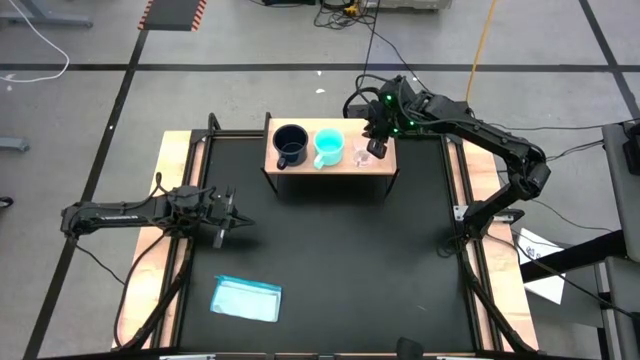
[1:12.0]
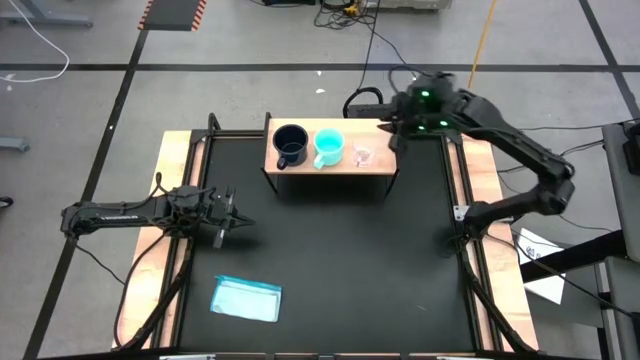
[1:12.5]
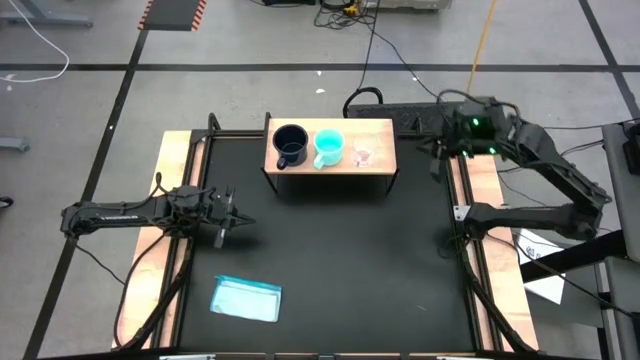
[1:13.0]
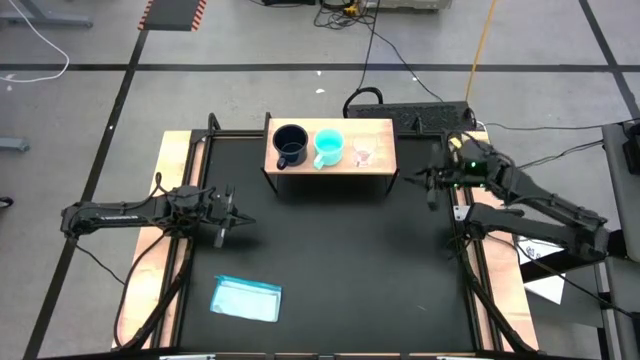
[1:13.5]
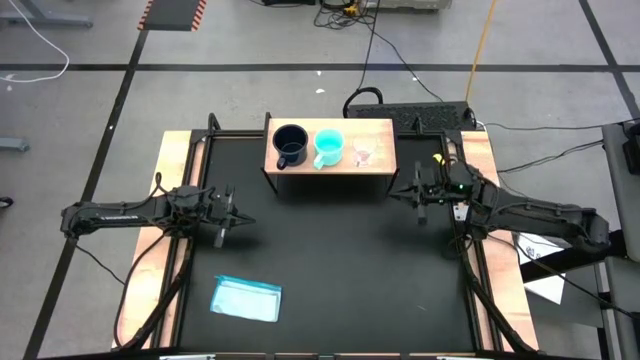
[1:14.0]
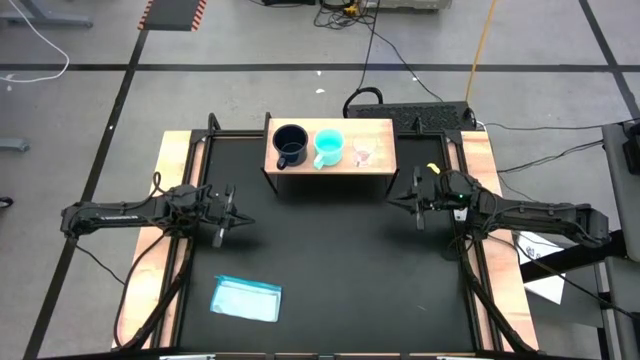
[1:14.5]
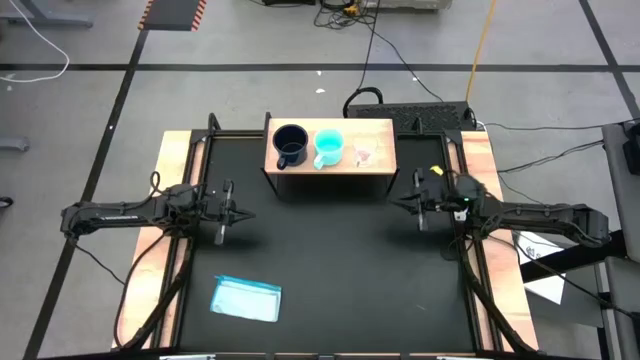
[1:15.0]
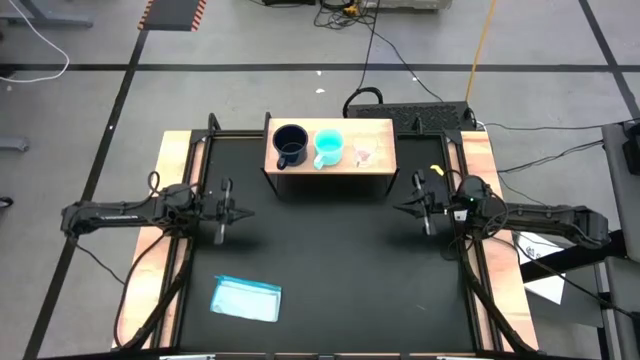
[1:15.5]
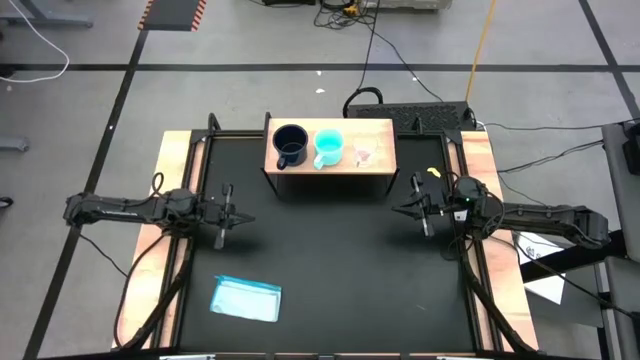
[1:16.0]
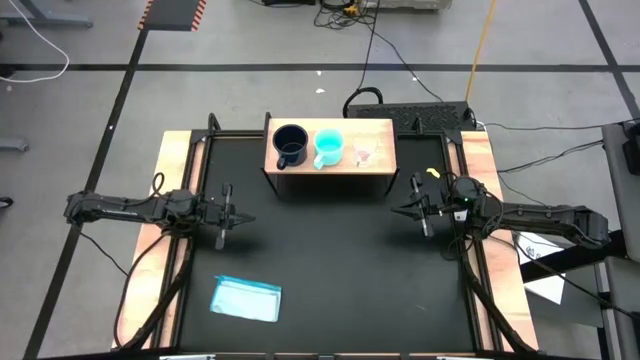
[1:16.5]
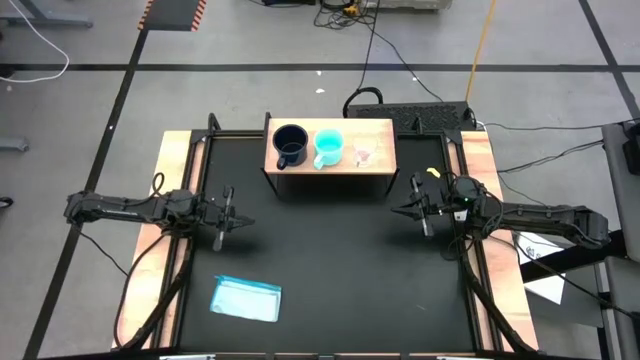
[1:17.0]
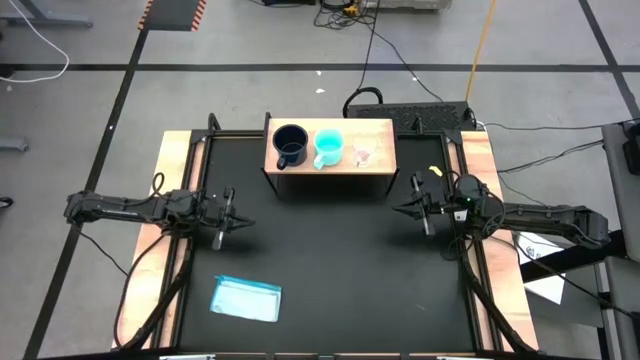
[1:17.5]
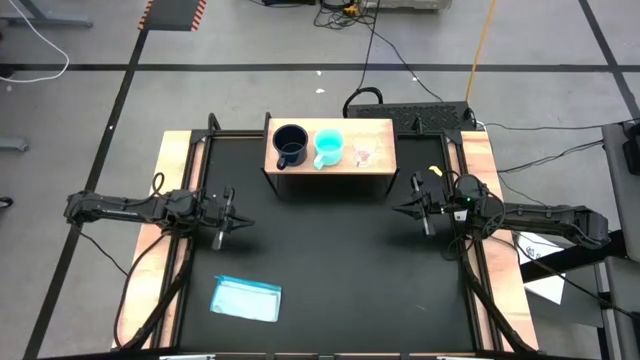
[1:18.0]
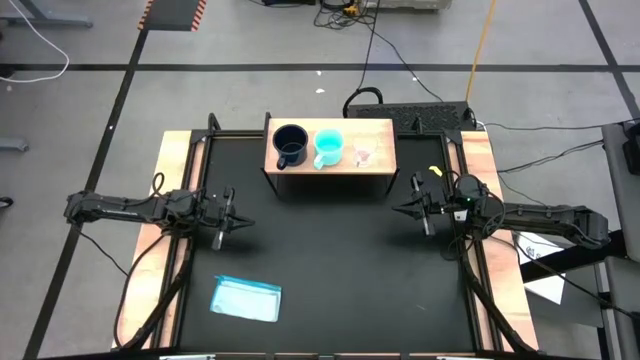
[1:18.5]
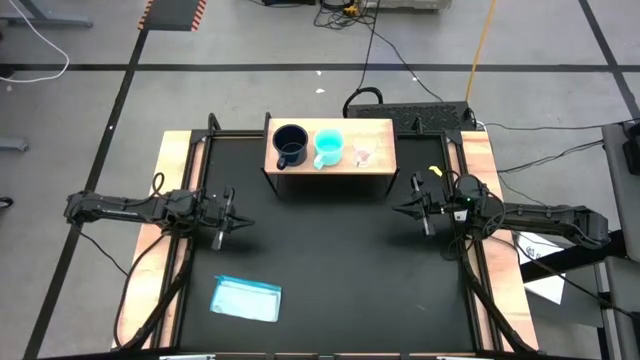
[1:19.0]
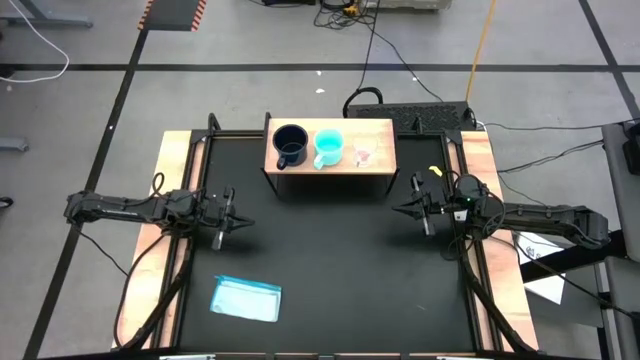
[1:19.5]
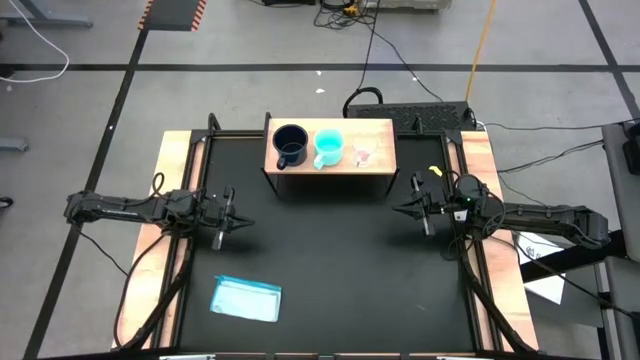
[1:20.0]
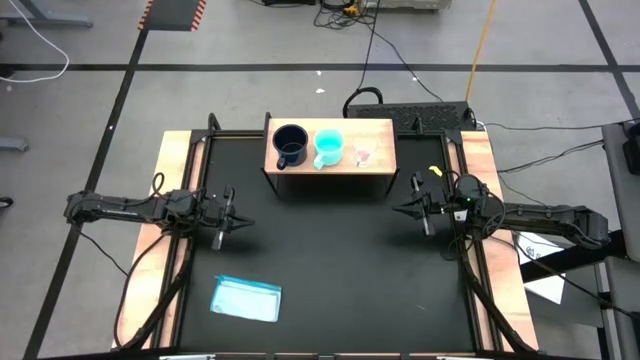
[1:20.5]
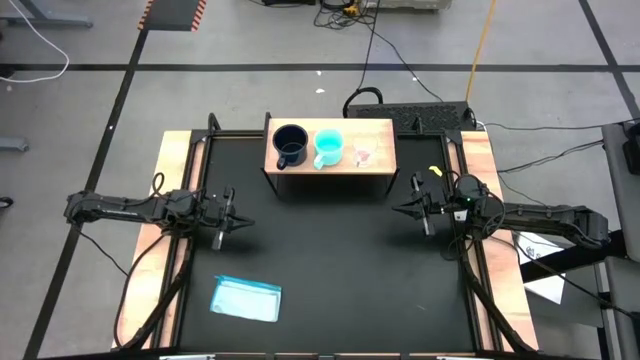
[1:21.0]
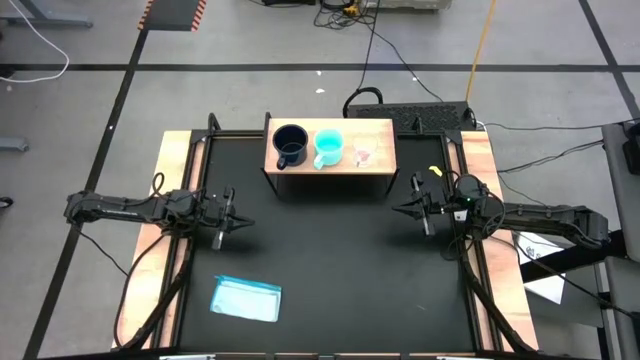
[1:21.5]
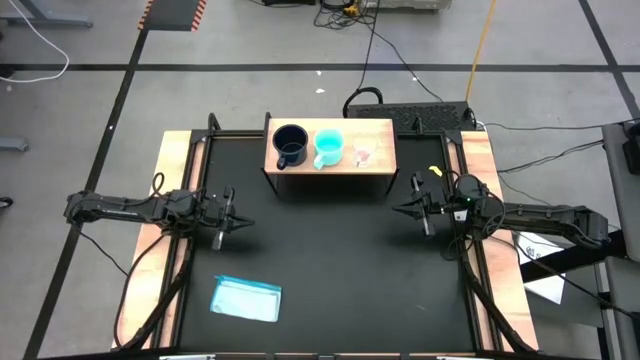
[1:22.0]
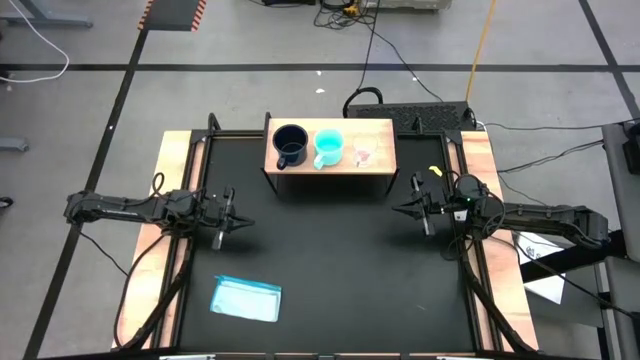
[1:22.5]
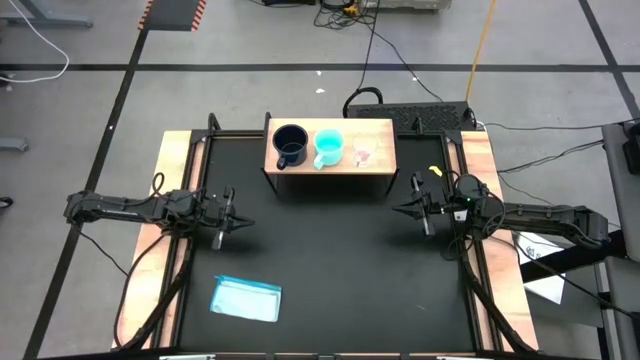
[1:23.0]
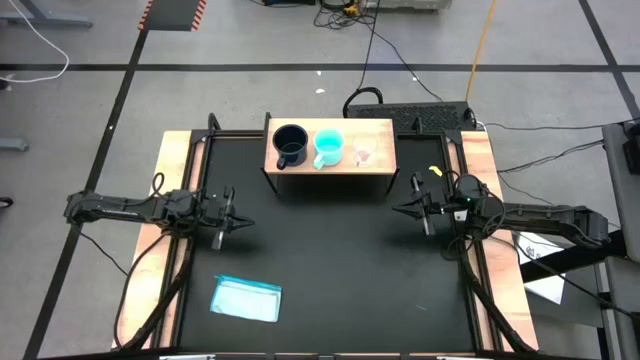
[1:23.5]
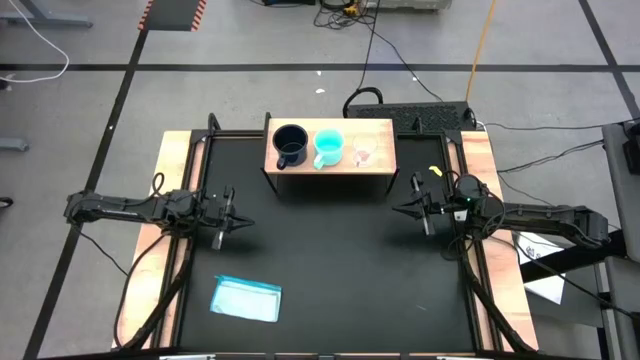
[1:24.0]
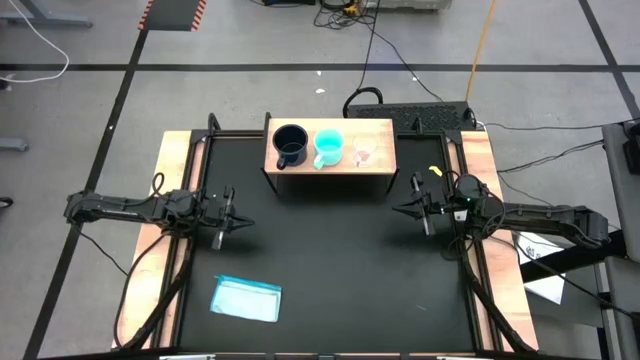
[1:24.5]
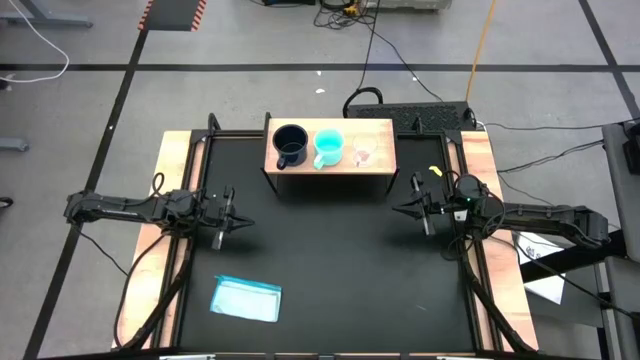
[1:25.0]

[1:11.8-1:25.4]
Task: Stack small to large cups/mugs on shelf
Return to Home Position

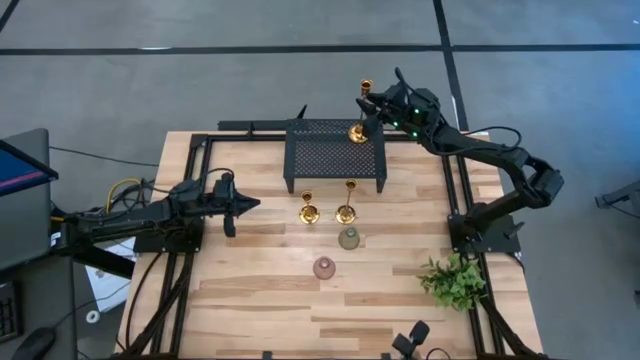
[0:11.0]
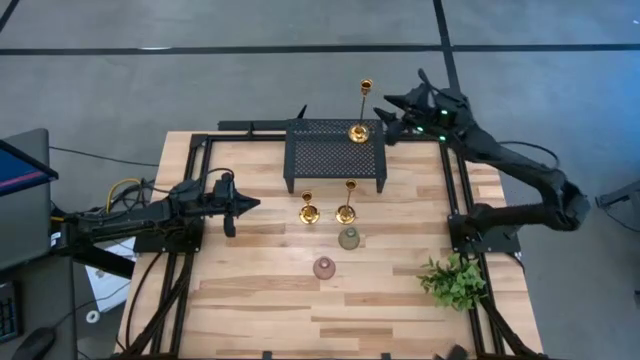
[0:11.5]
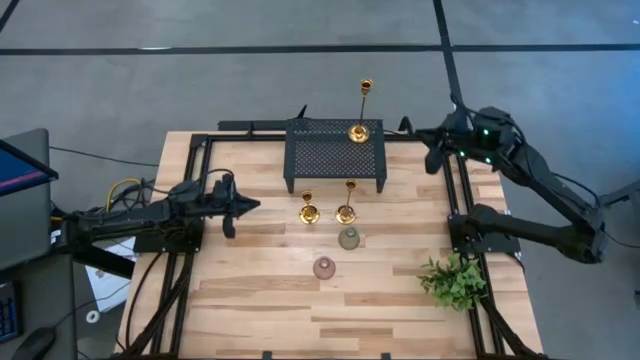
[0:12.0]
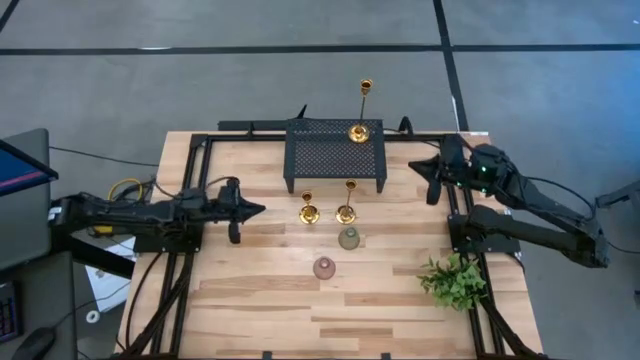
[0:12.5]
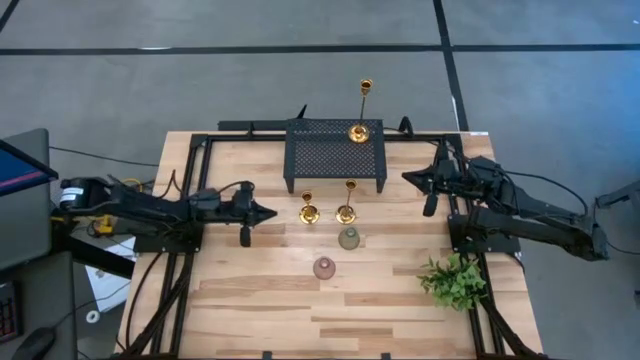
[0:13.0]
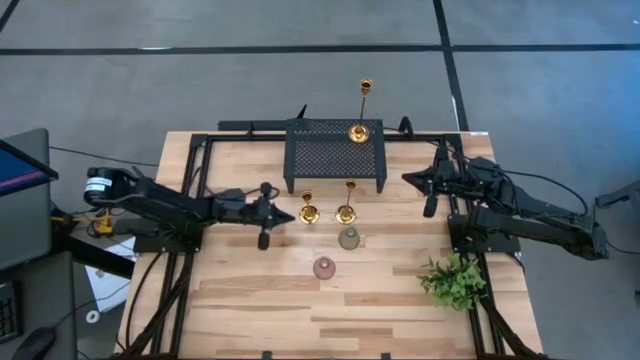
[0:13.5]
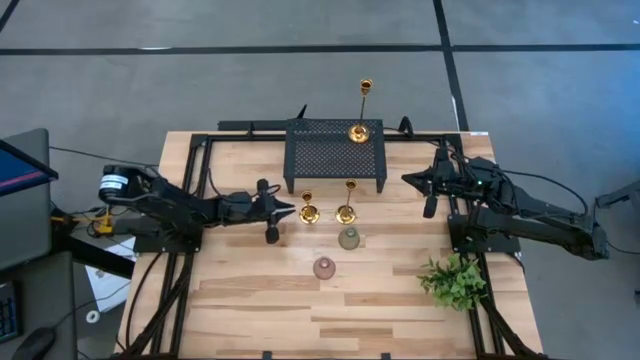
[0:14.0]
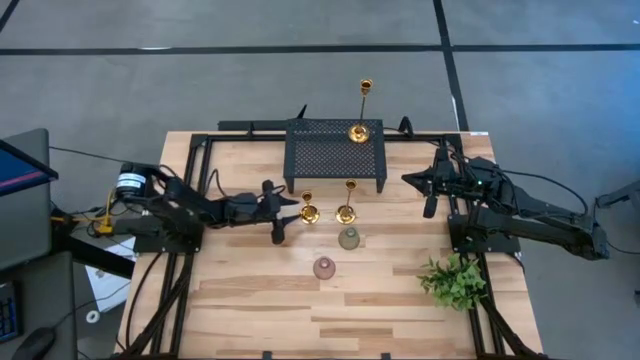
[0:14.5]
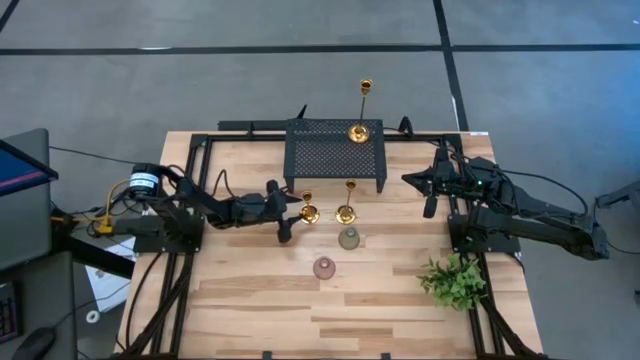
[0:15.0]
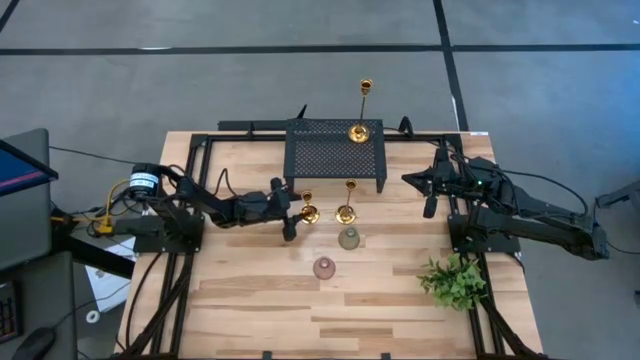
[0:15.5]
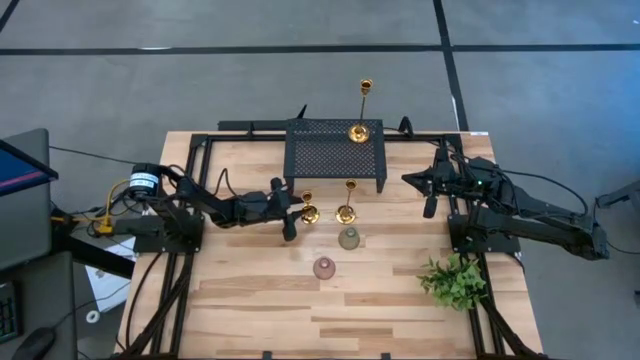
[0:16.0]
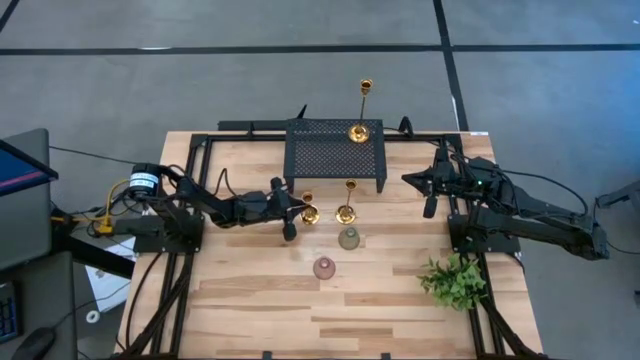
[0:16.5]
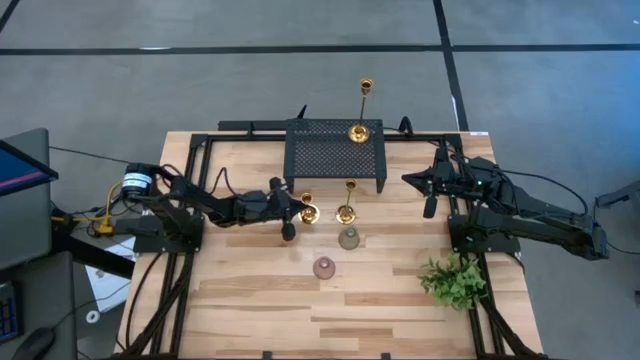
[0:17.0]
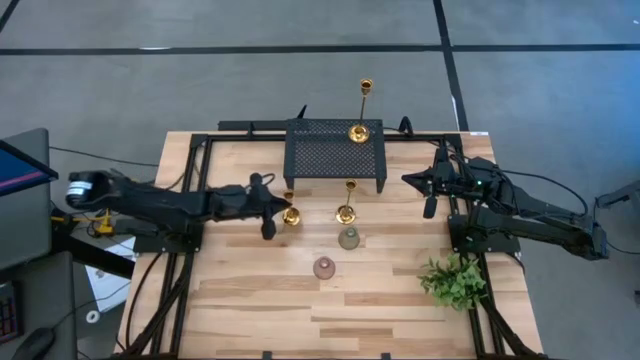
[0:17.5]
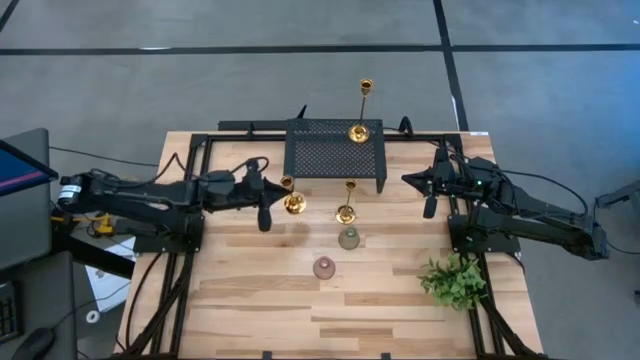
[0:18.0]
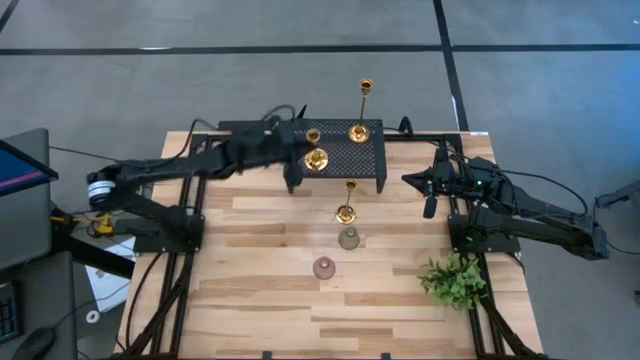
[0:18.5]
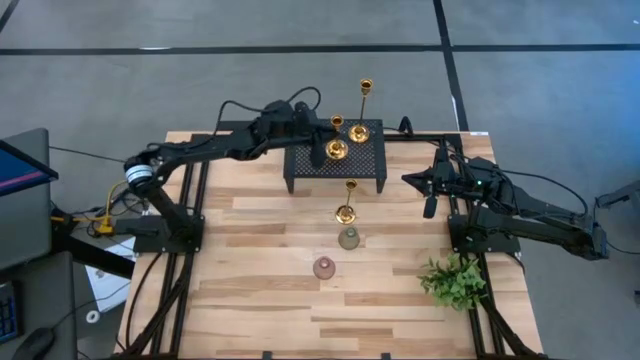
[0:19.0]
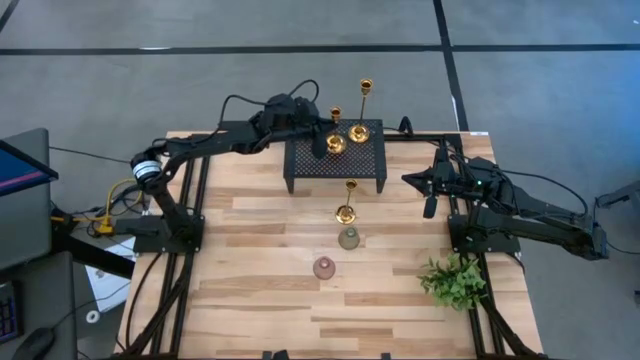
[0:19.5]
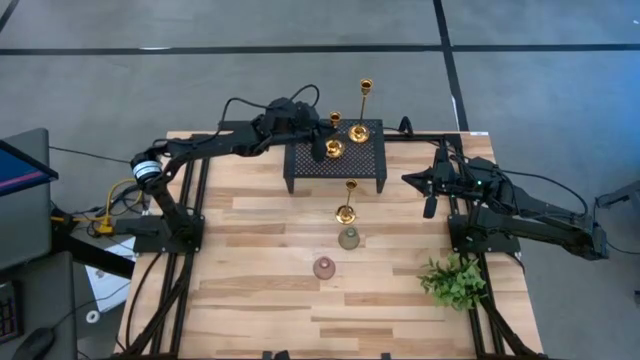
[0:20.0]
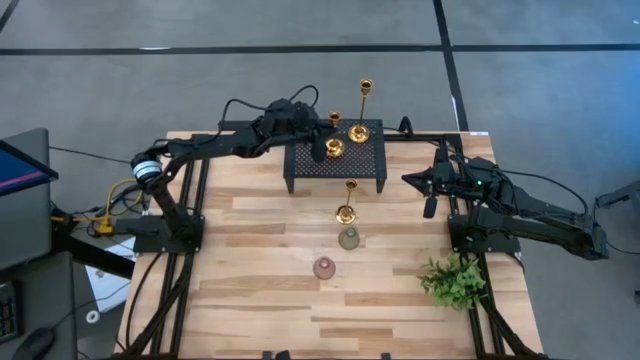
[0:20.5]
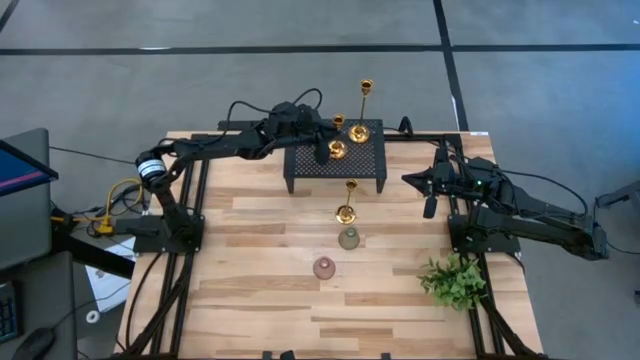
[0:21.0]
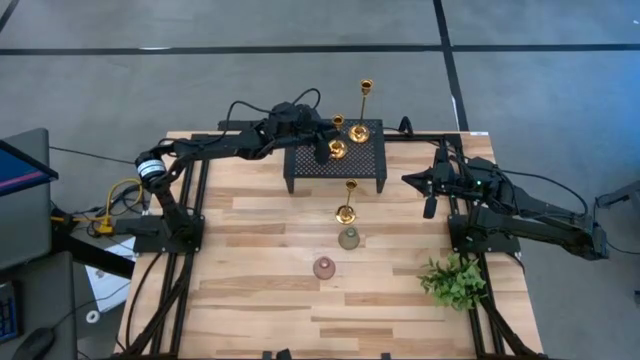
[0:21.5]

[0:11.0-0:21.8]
Task: Pick & Place candle stick holders
Put the left gold candle holder on the shelf
